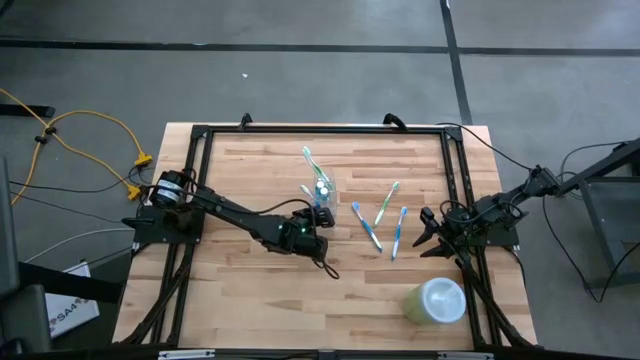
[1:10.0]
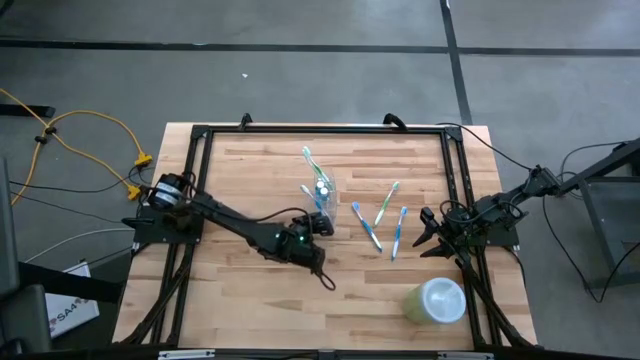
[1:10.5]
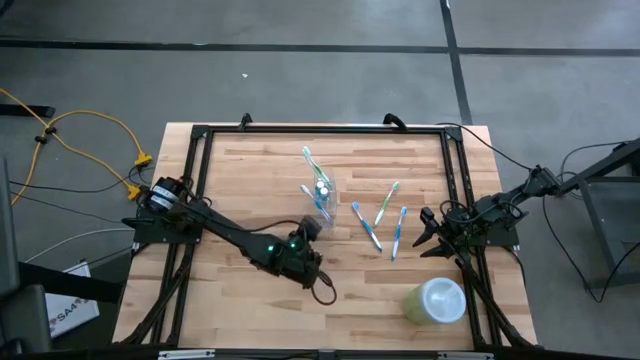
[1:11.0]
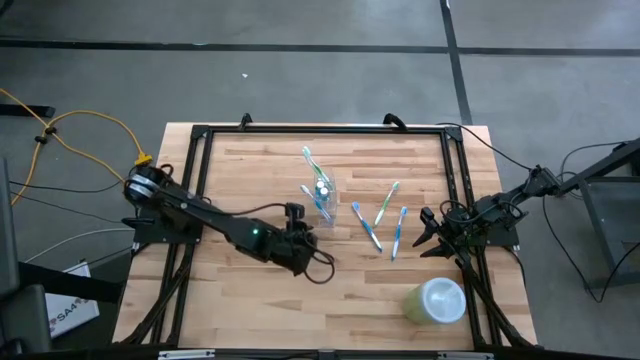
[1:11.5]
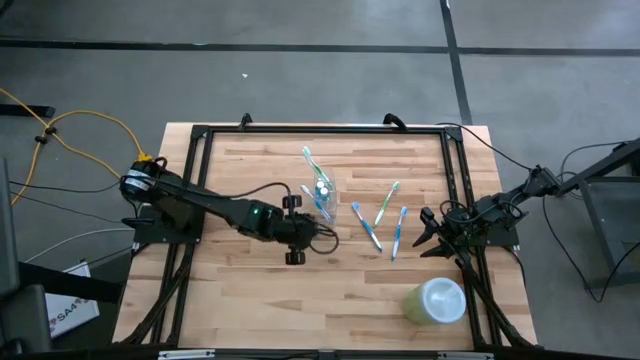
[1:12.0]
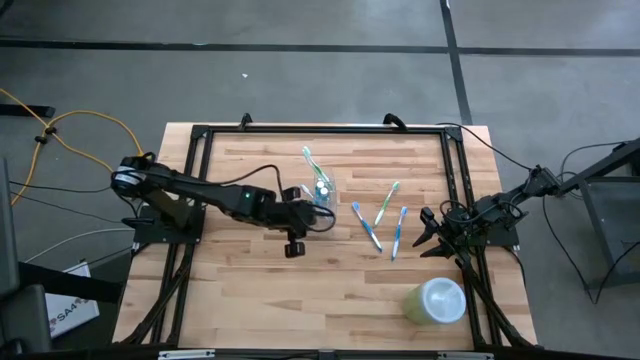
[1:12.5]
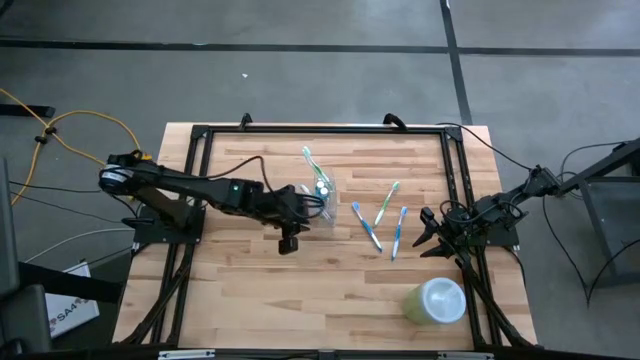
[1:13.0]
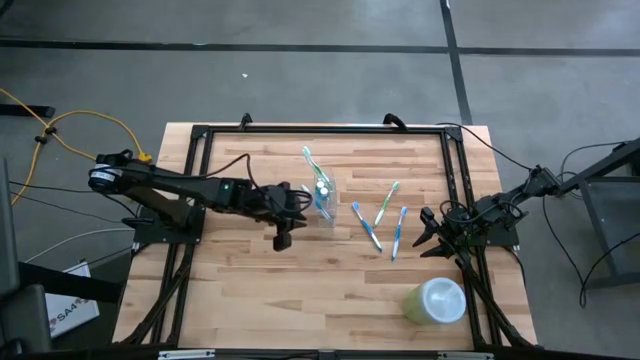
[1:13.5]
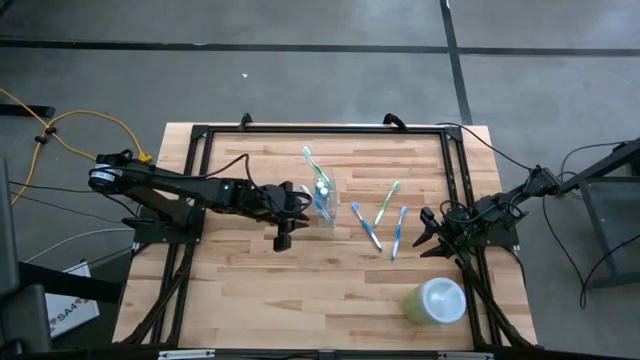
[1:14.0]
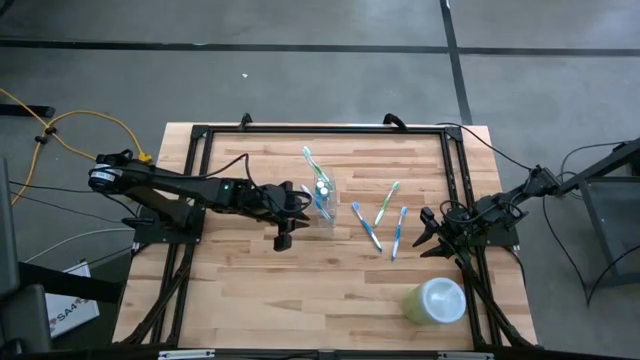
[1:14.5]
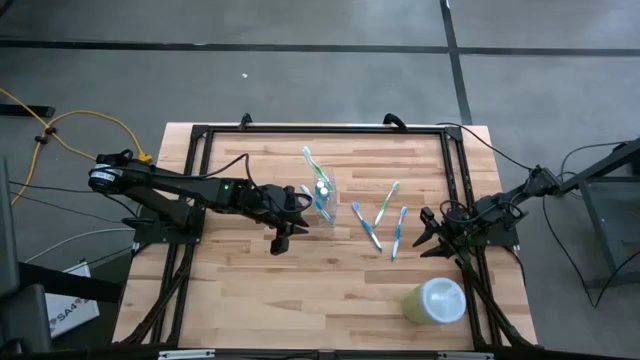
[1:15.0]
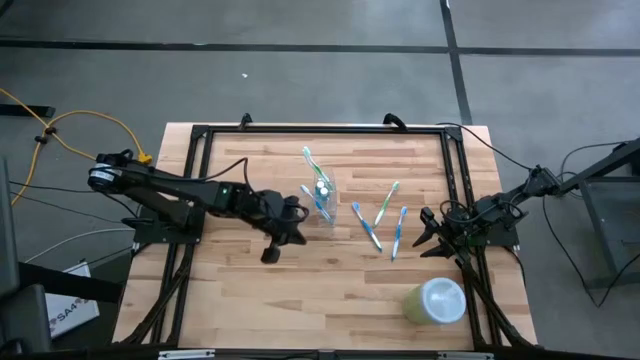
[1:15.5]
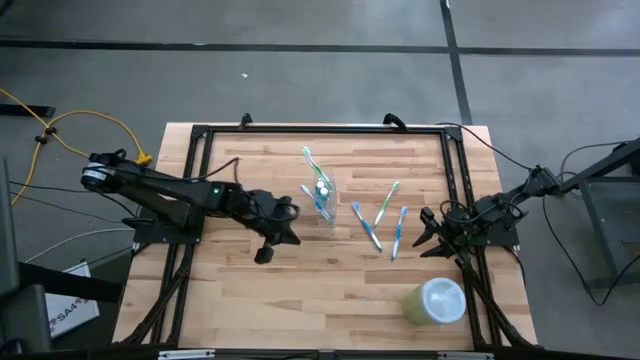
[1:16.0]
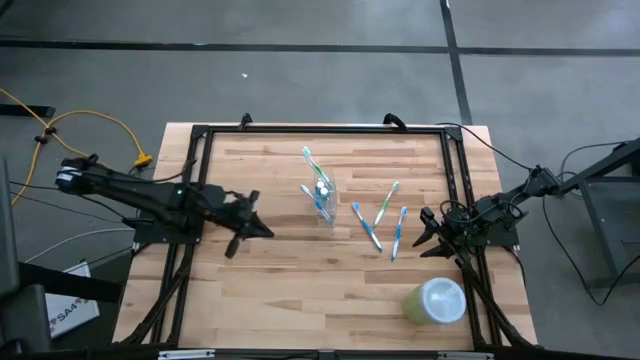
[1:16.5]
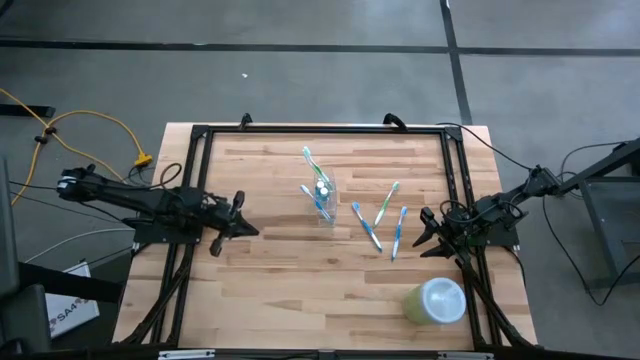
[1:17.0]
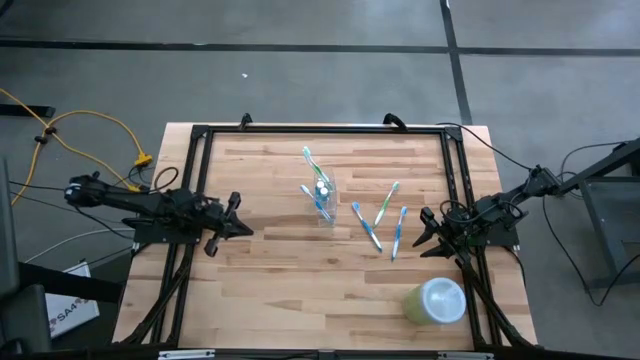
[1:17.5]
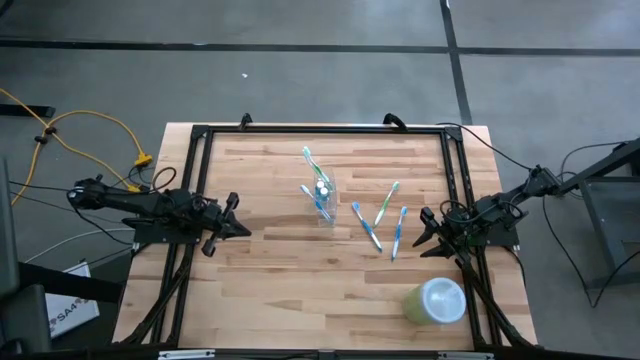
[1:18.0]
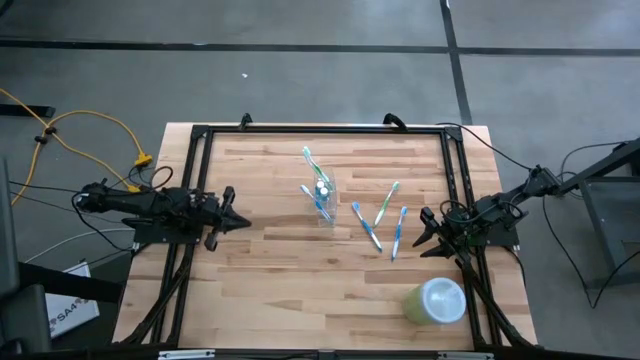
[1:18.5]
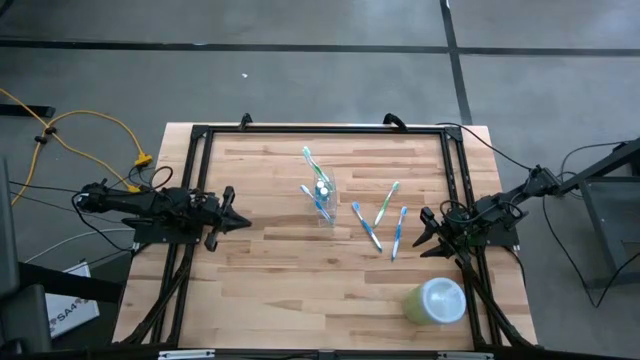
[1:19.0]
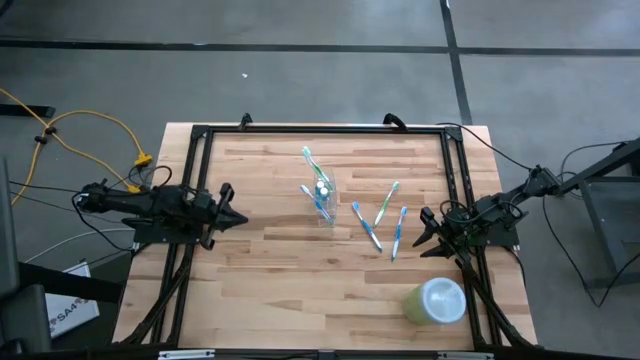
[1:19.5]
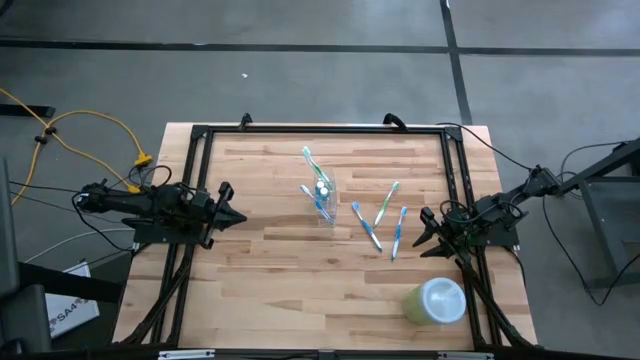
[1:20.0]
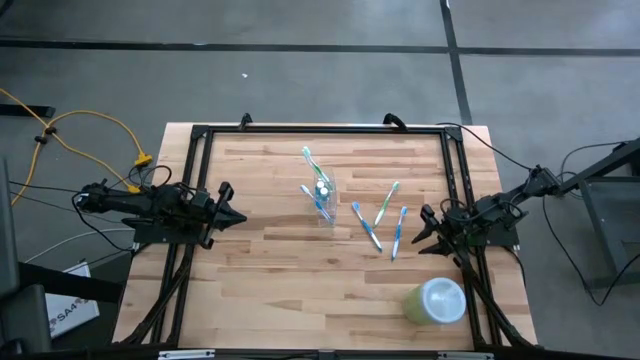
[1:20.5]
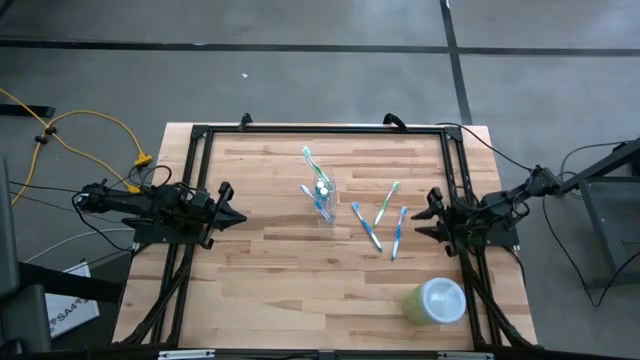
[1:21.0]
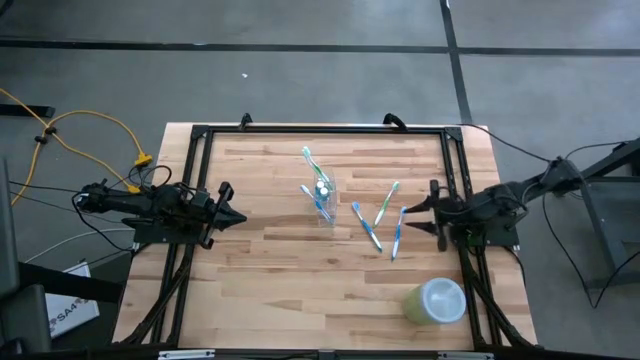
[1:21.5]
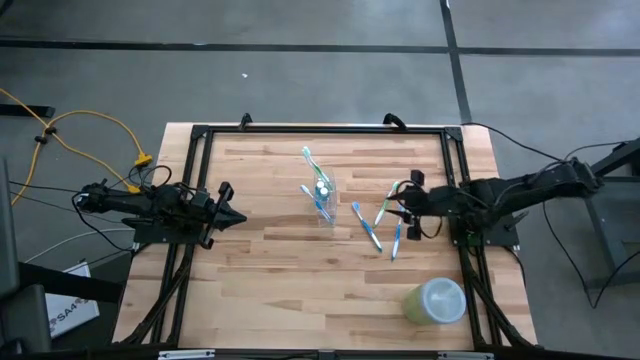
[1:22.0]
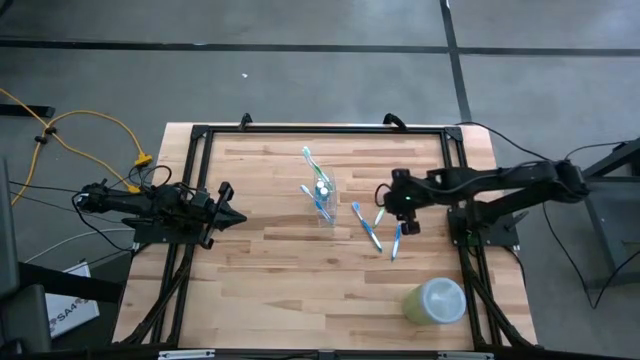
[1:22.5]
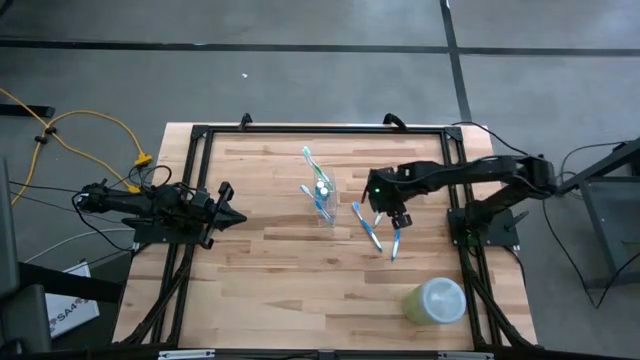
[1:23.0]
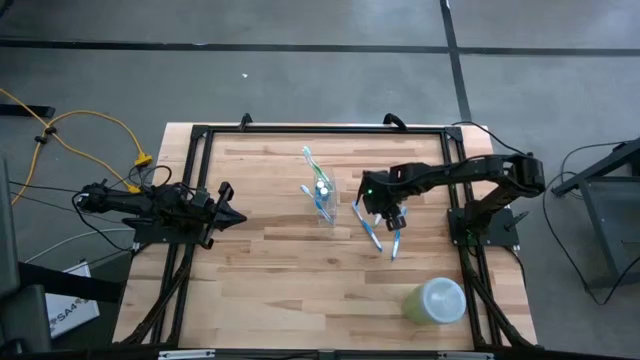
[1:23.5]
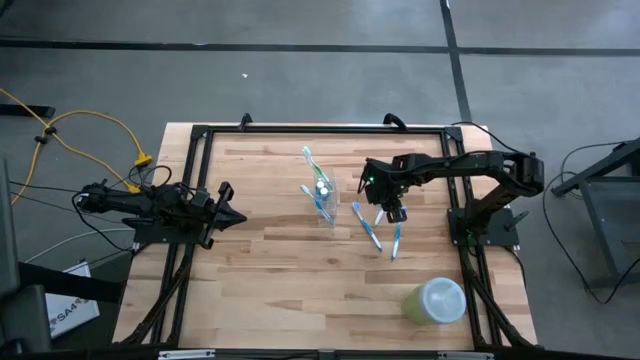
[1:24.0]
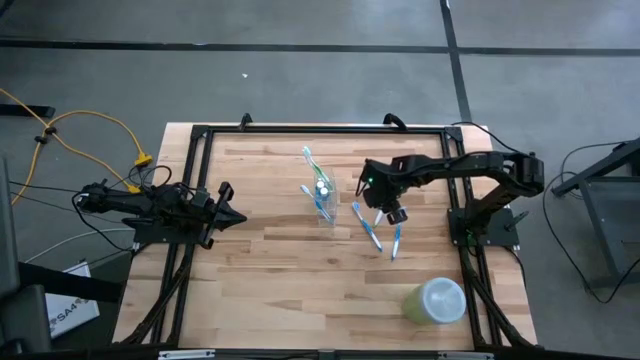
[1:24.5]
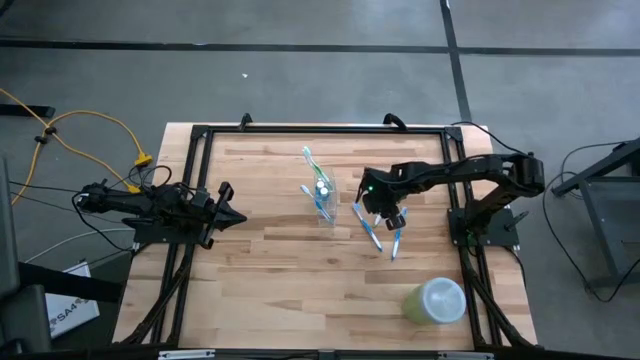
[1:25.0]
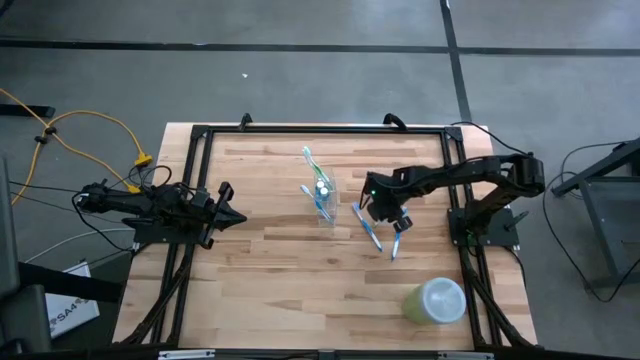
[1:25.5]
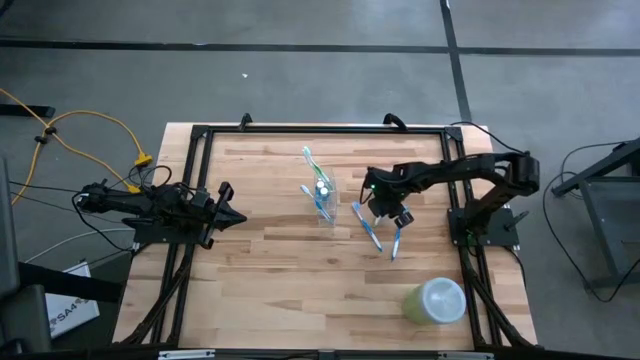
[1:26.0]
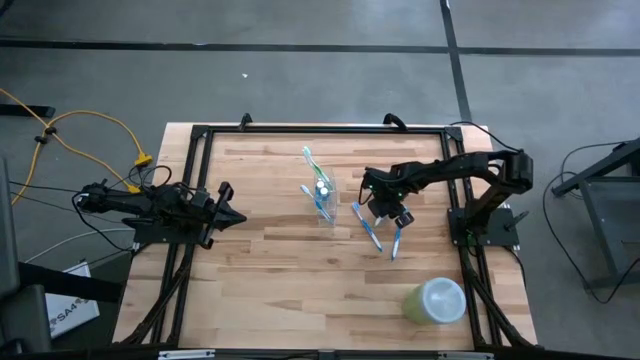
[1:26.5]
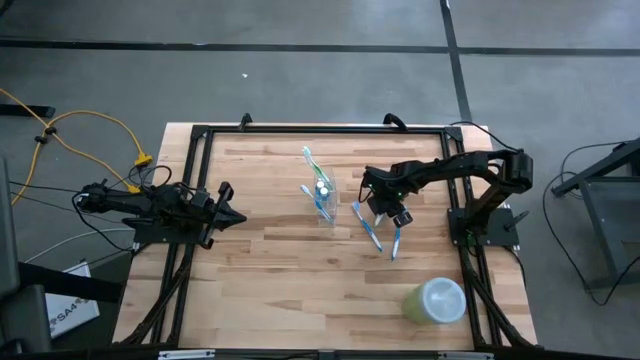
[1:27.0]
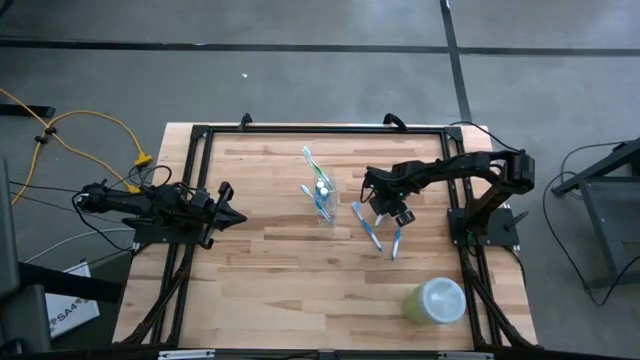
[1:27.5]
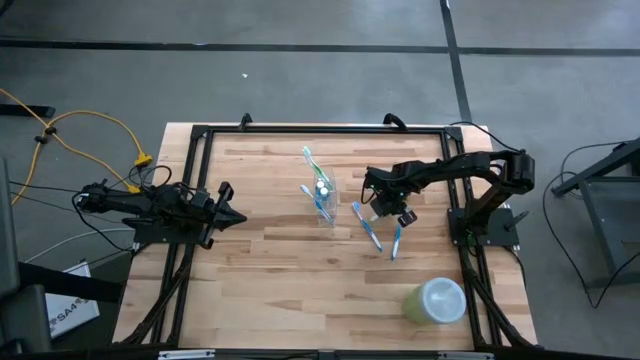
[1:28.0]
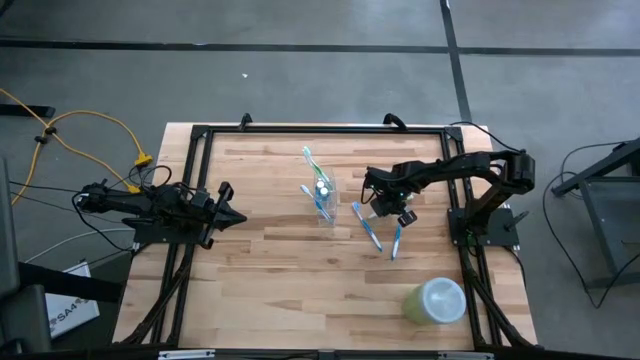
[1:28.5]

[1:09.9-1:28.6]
Task: Pick & Place toothbrushing station
Put the green toothbrush into the transparent organizer

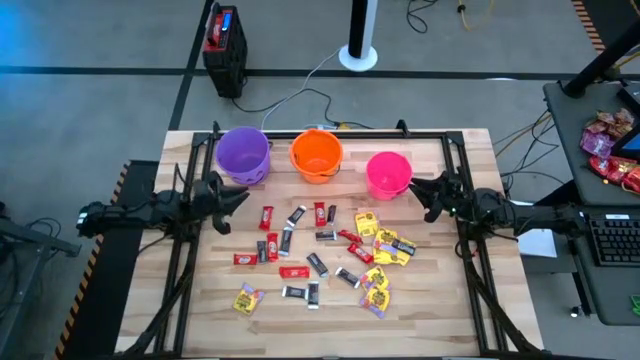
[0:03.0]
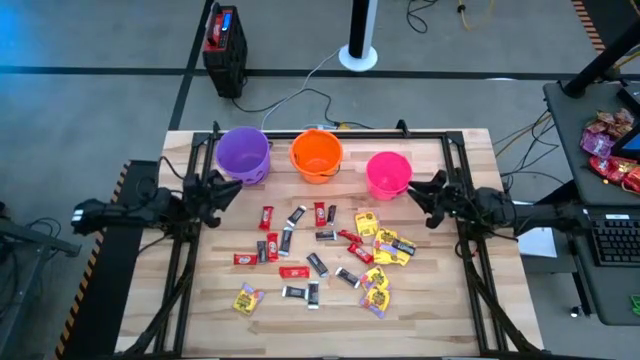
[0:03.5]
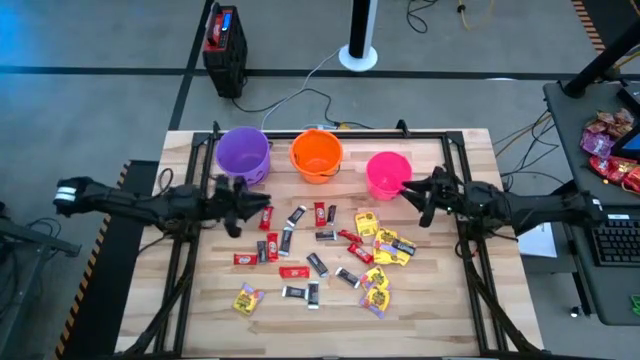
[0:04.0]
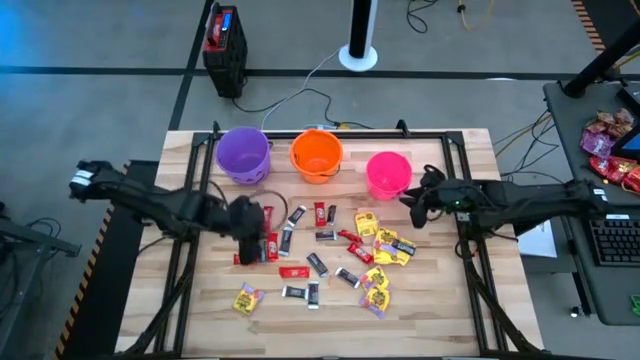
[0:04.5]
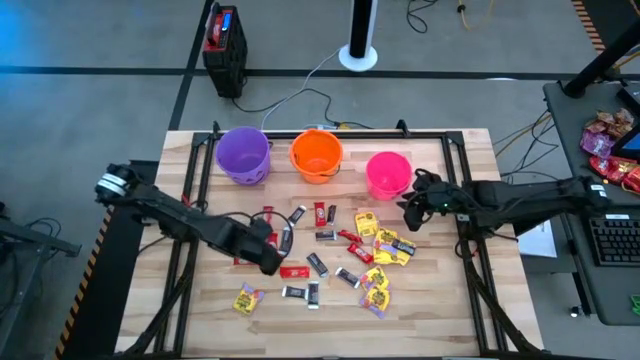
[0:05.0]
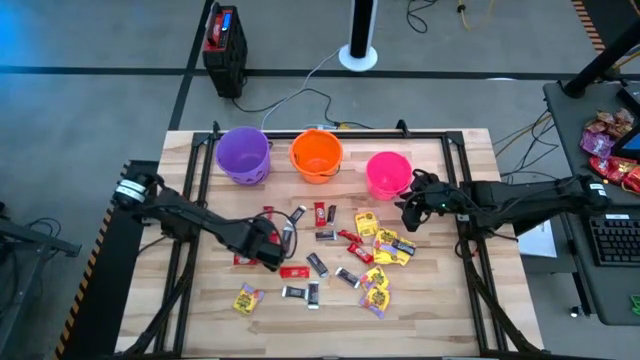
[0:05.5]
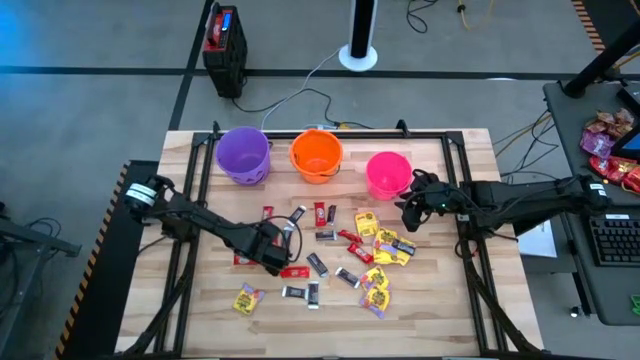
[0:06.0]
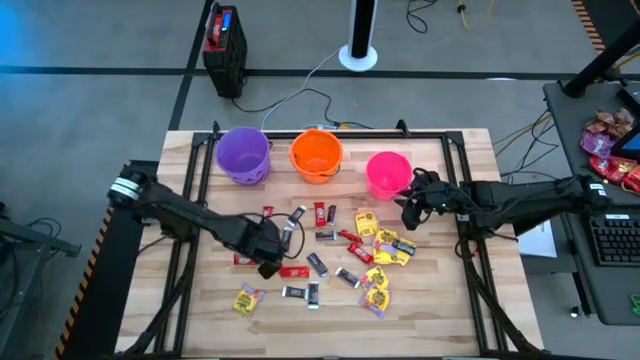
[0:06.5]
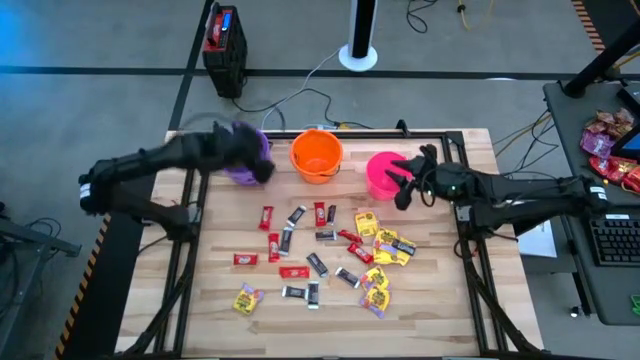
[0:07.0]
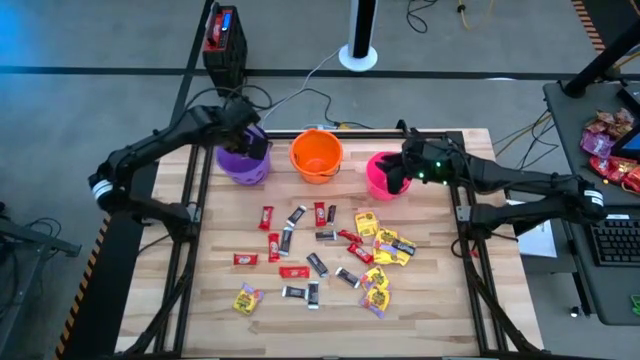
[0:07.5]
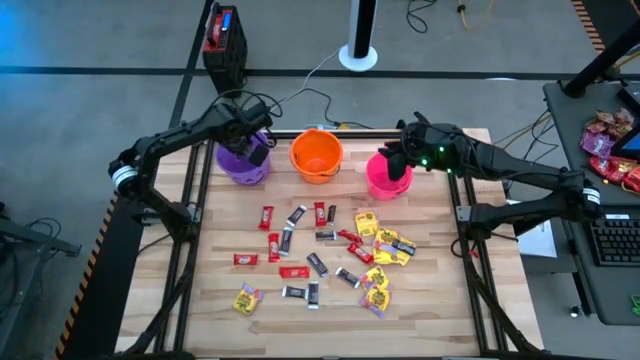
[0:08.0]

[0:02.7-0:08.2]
Task: Sort candy by brand, put in halloween buckets
Put the black candy into the violet bucket
